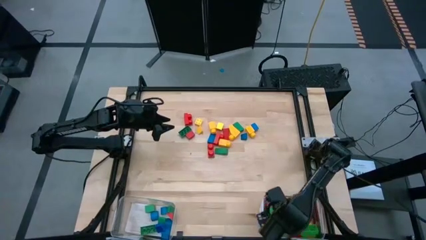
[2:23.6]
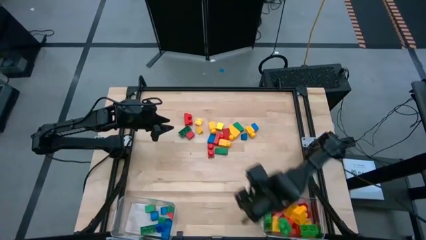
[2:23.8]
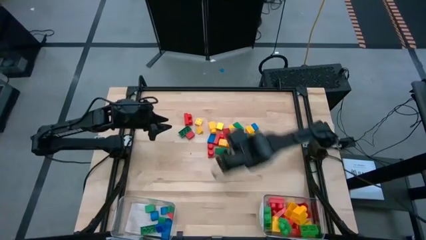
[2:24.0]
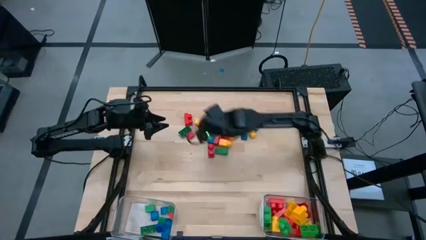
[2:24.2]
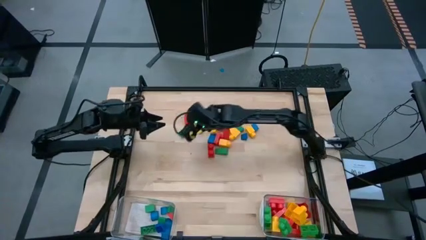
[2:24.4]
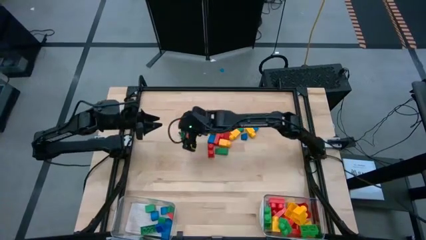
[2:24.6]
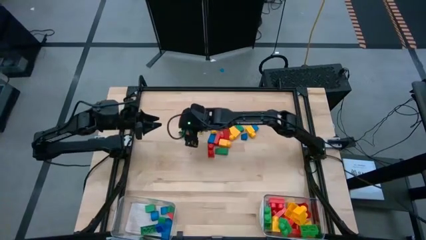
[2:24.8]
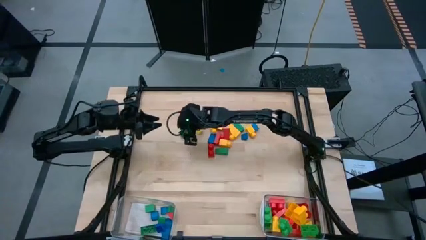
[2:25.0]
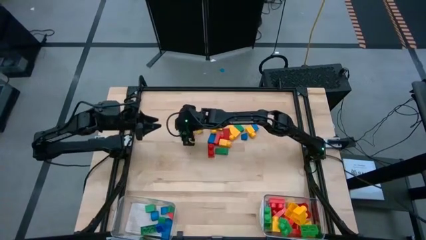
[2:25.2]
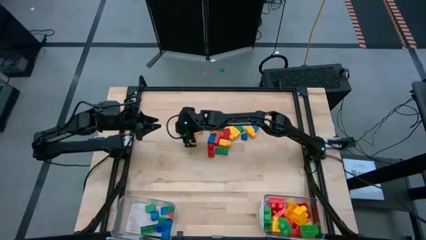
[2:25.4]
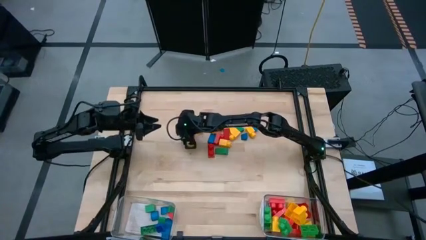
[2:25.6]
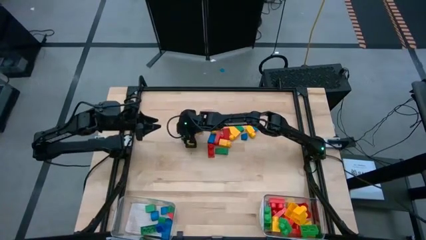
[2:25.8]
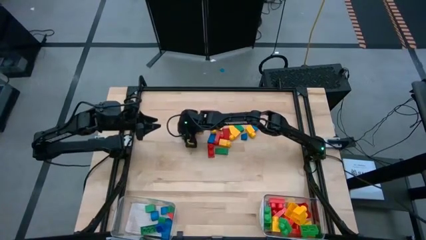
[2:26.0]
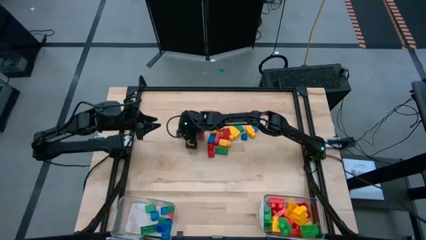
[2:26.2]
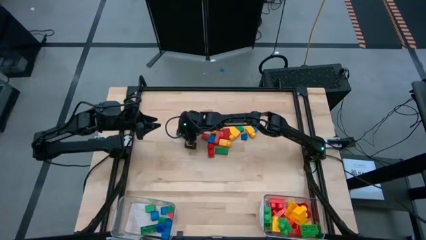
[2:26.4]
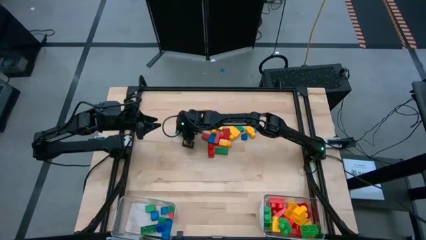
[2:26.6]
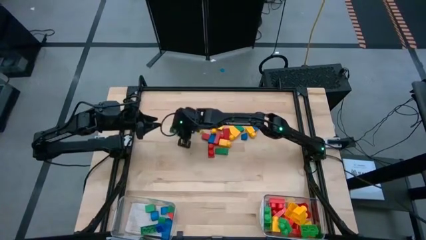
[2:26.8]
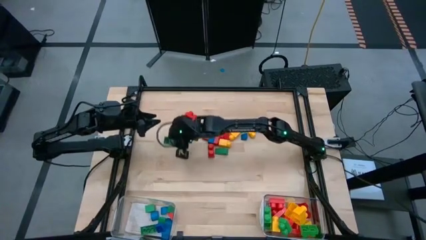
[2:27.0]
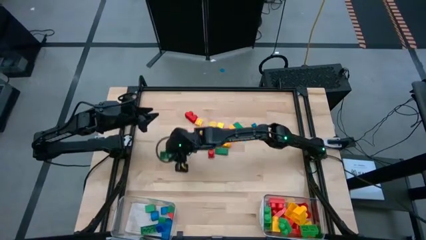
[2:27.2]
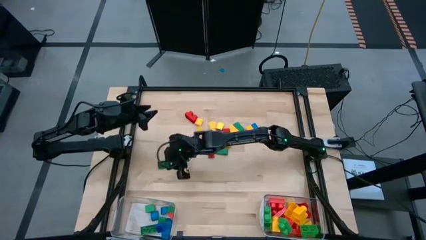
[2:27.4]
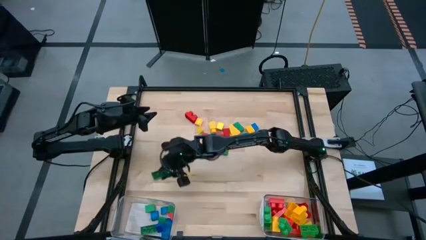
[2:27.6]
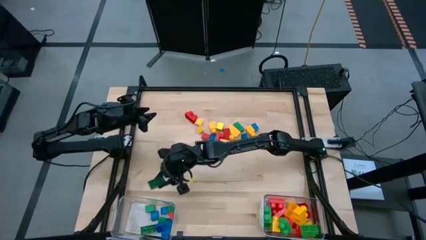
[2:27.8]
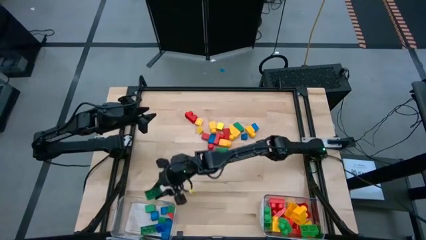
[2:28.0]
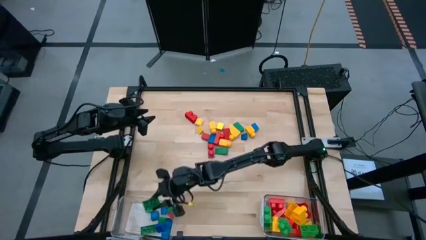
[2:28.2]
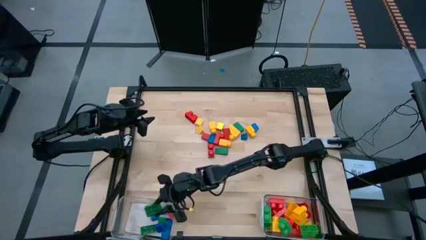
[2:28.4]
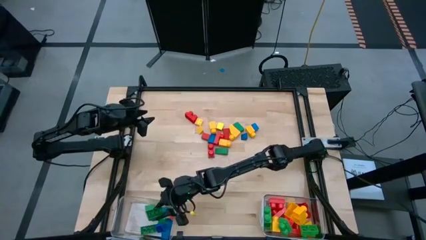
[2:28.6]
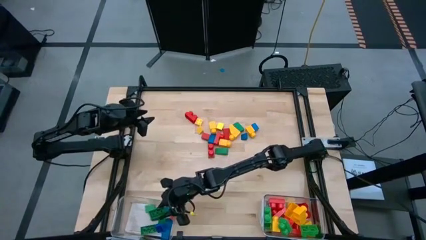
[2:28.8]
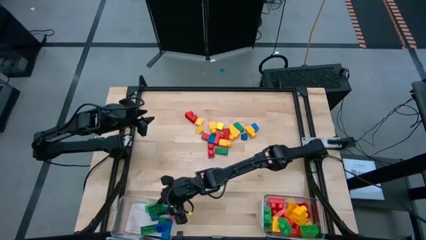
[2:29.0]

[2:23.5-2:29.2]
Task: Sort blocks by size
Put the green game piece into the left transparent bin

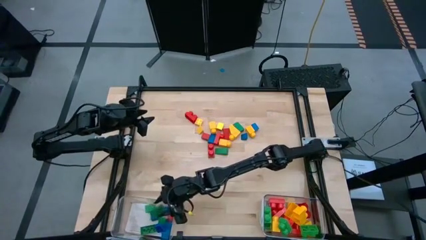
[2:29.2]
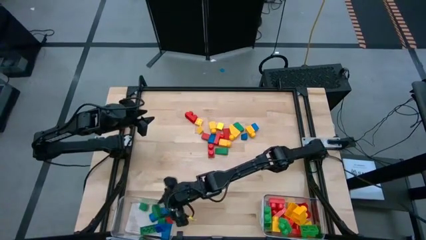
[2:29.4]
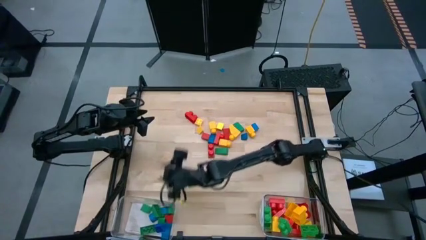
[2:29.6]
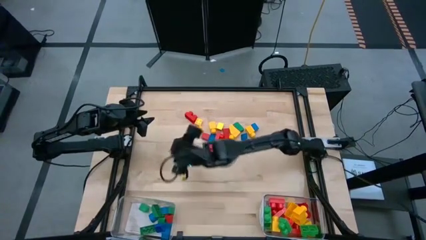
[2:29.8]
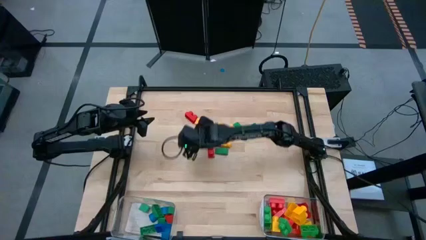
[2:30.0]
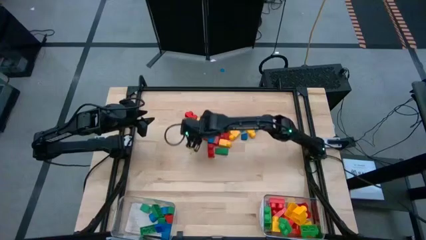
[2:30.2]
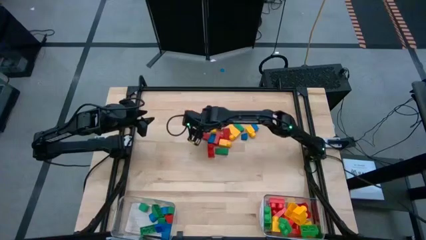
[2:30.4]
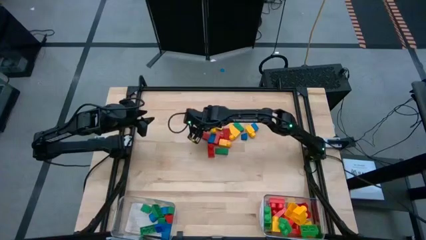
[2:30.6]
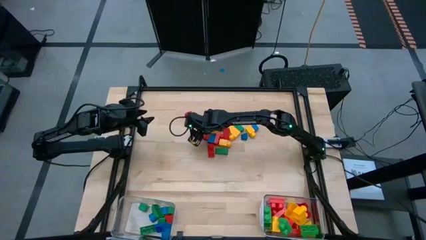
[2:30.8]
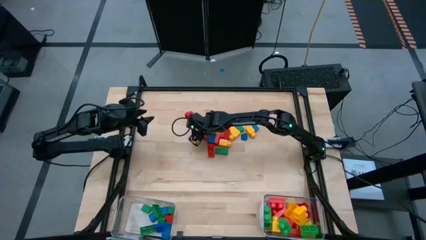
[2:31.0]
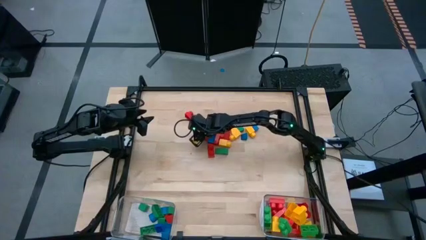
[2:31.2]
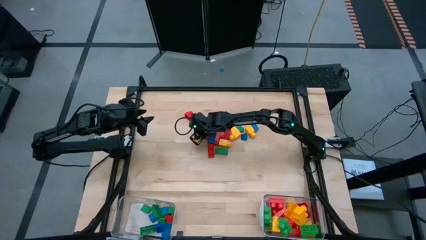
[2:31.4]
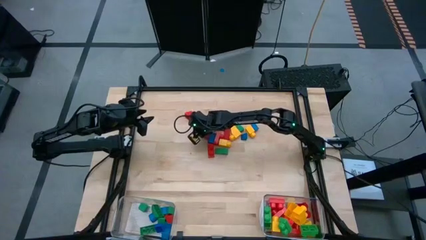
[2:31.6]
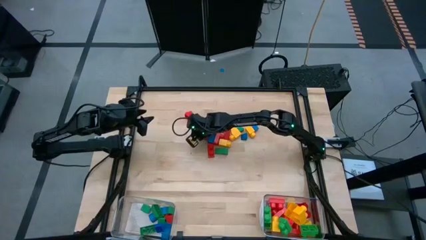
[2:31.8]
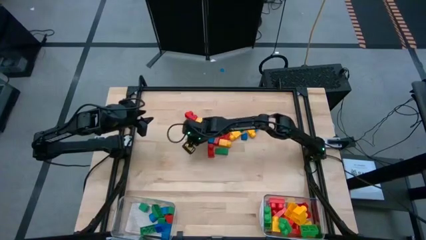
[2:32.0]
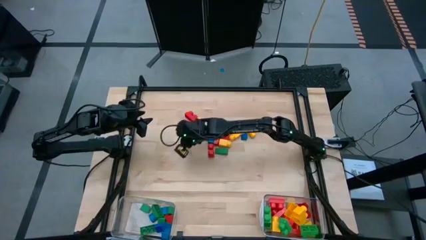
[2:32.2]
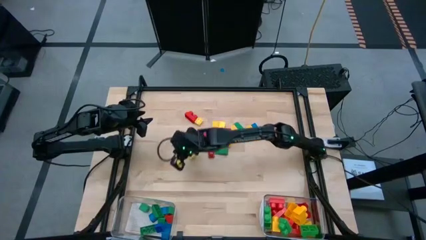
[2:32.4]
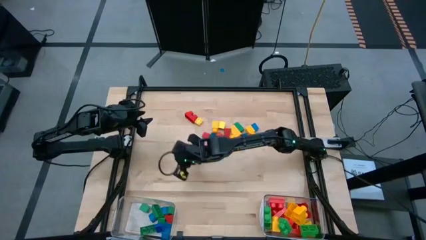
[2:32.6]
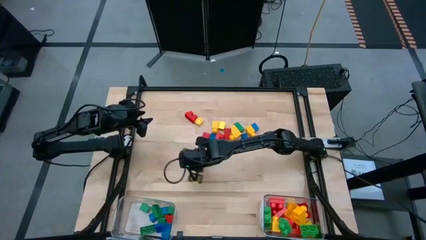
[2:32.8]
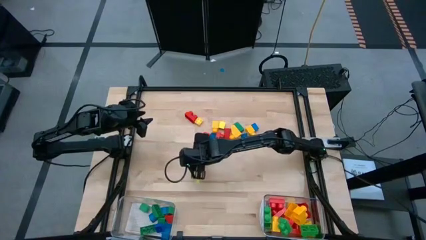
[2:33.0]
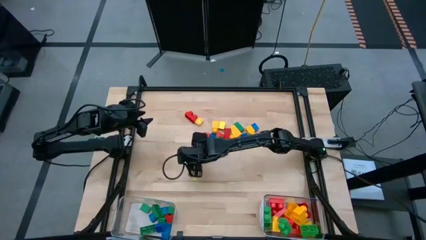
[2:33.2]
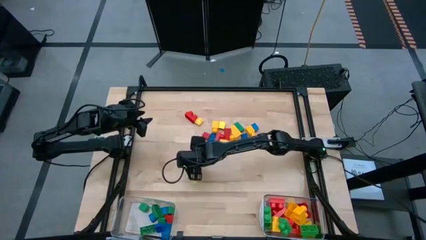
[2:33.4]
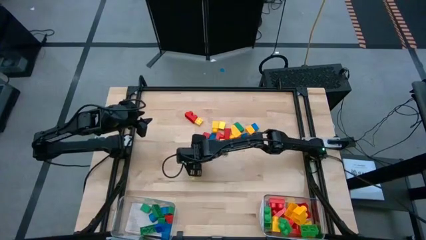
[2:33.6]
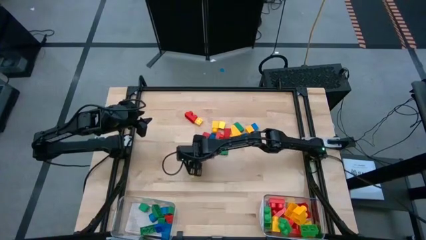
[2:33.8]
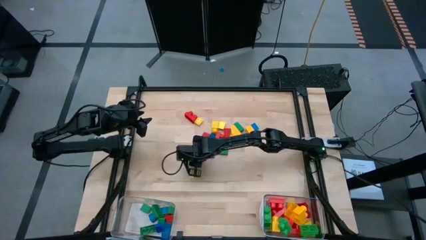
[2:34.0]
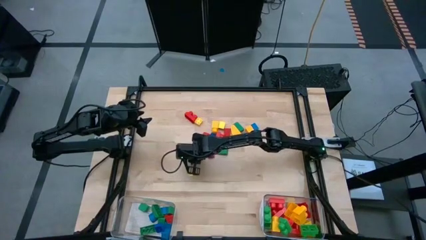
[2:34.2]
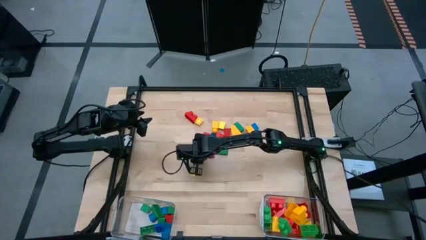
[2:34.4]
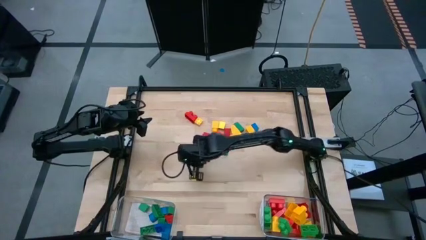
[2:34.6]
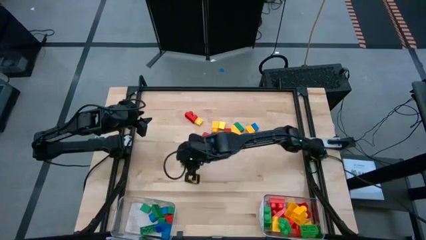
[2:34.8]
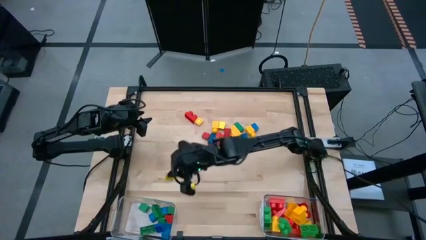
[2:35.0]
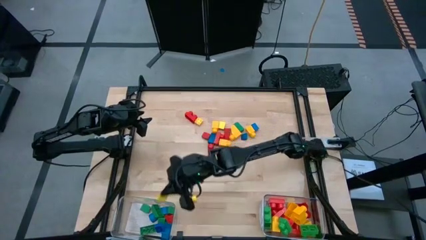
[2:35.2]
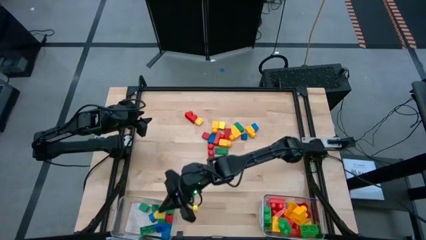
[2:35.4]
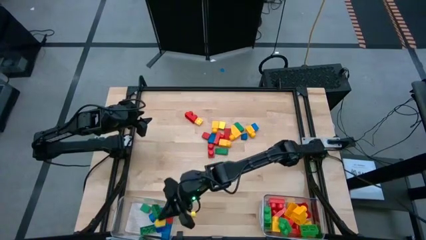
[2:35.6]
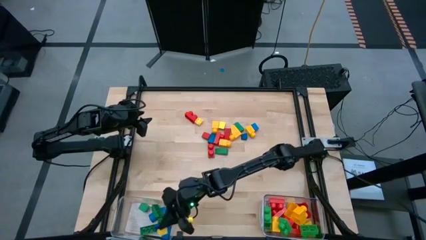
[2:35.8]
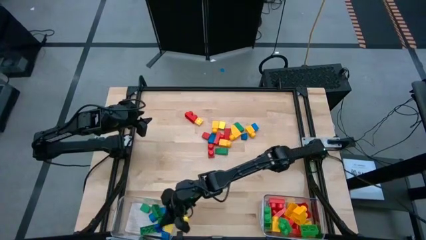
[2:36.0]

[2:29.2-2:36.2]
Put the yellow triangular block into the left transparent bin

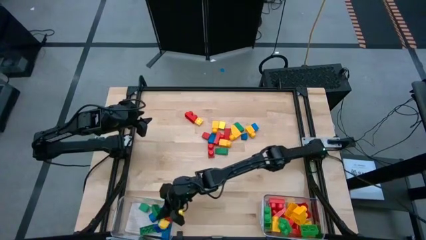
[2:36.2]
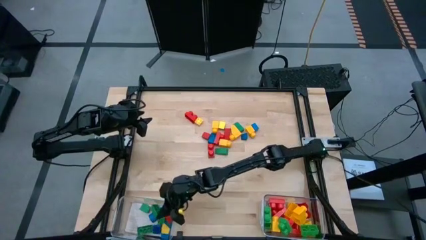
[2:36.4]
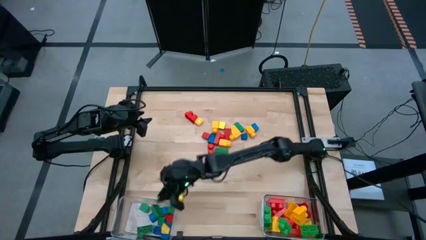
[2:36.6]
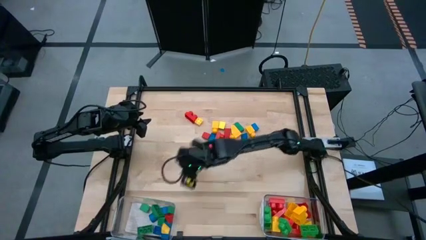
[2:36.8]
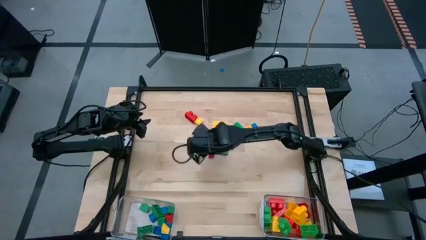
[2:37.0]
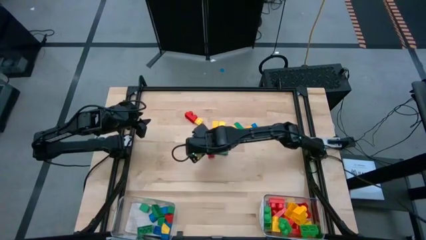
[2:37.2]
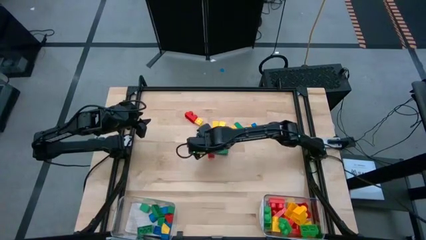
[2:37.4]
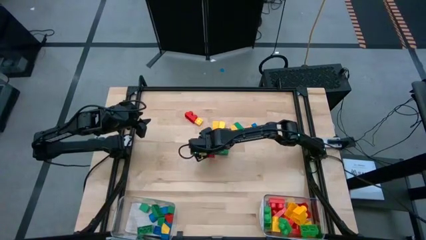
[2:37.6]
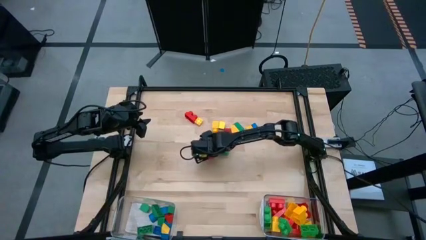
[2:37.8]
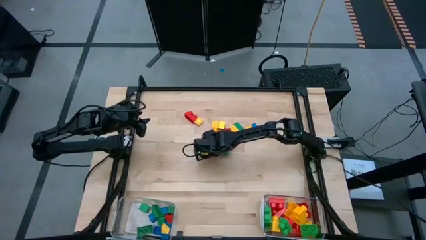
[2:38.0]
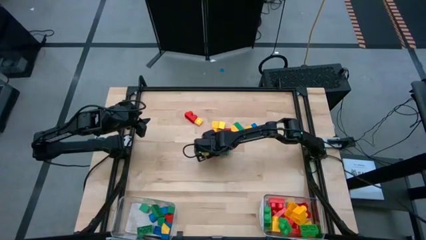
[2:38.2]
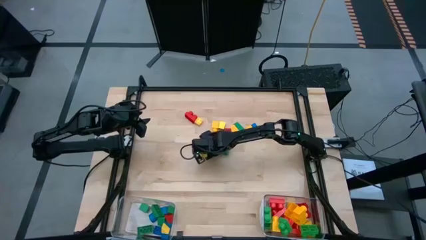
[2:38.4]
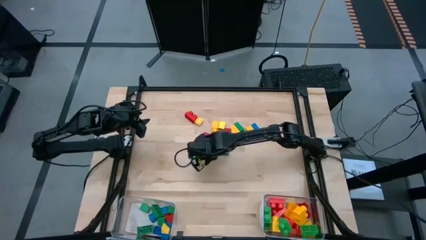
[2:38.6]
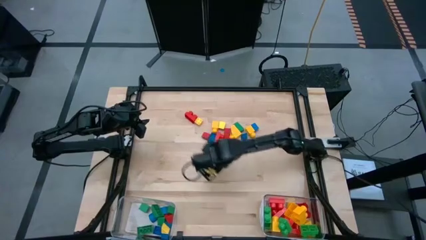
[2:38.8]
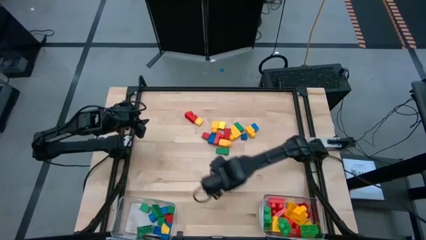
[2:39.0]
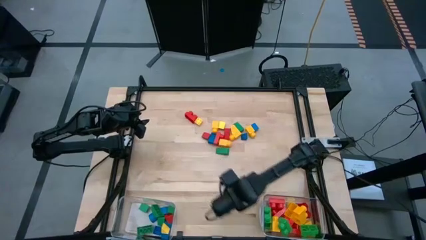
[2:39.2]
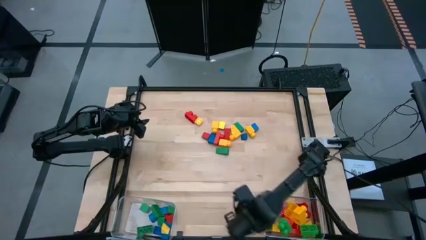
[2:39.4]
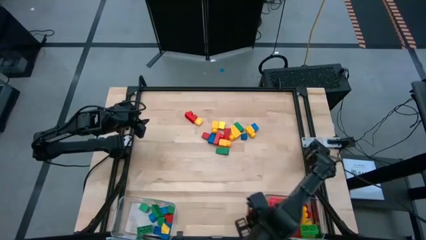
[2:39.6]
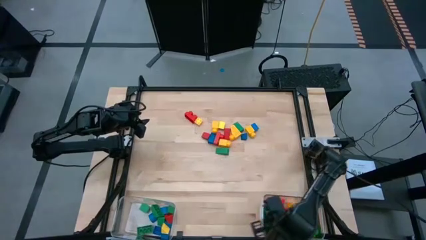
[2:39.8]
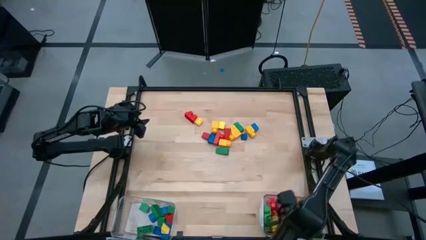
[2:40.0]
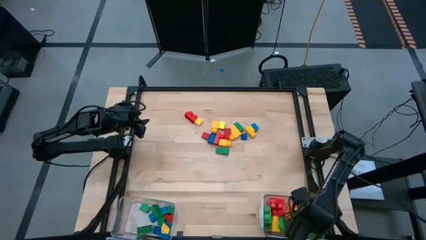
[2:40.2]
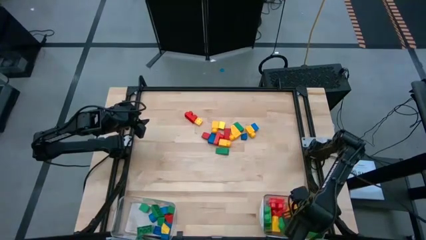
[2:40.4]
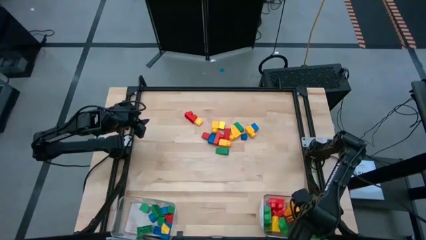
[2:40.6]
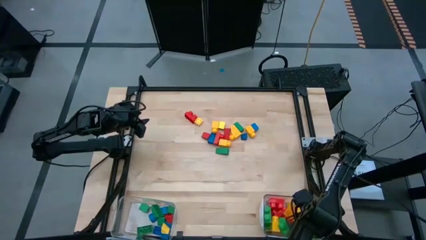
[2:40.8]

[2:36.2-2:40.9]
Put the red game piece into the right transparent bin
